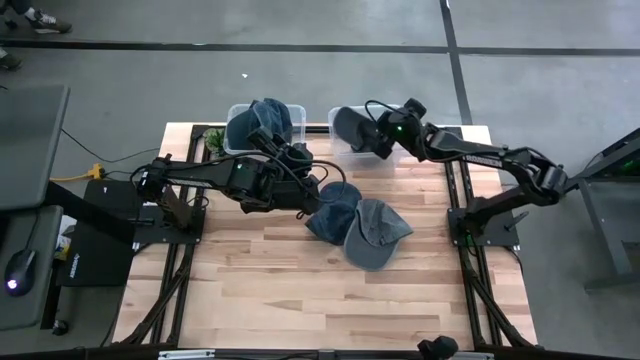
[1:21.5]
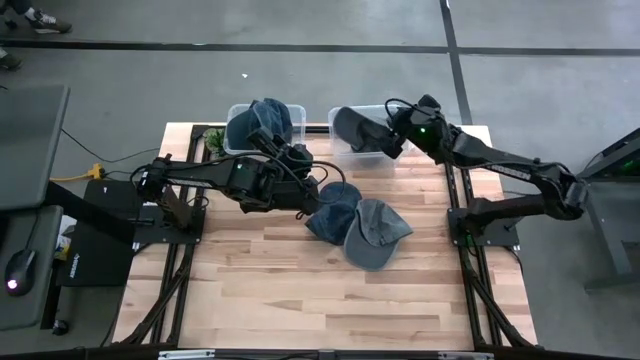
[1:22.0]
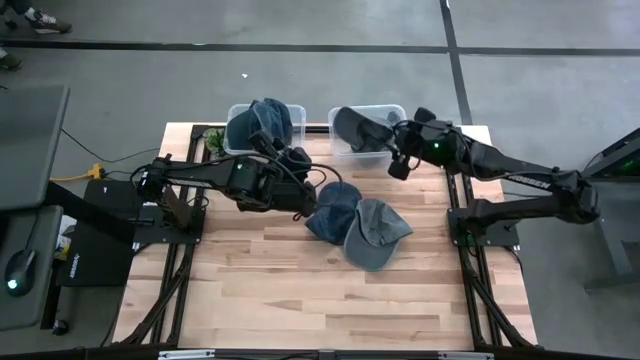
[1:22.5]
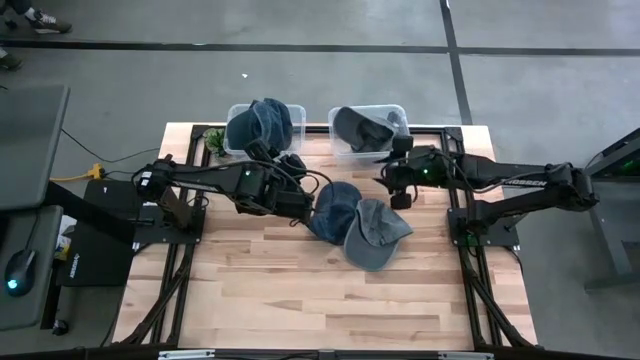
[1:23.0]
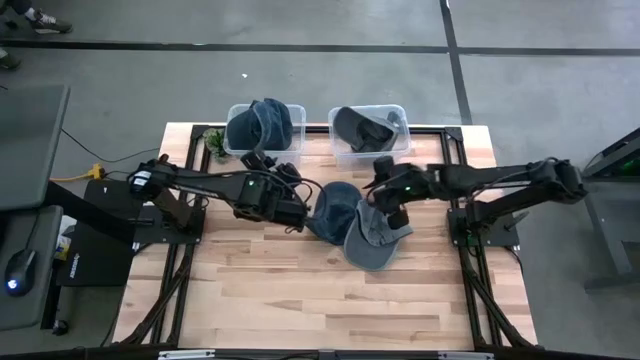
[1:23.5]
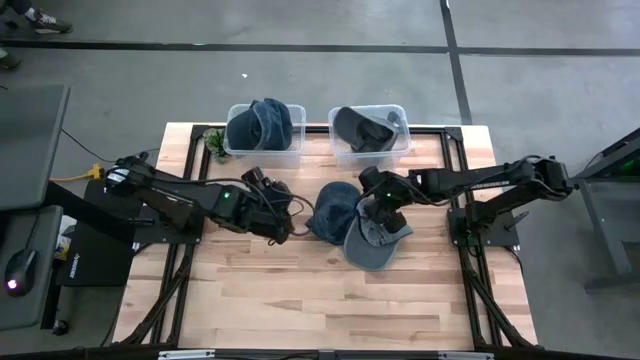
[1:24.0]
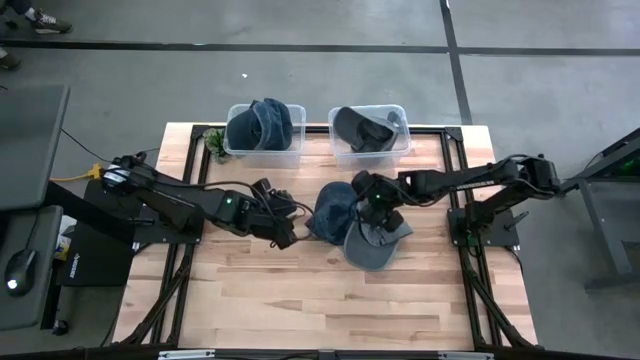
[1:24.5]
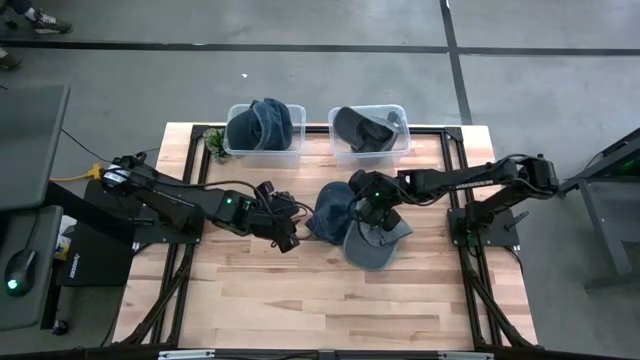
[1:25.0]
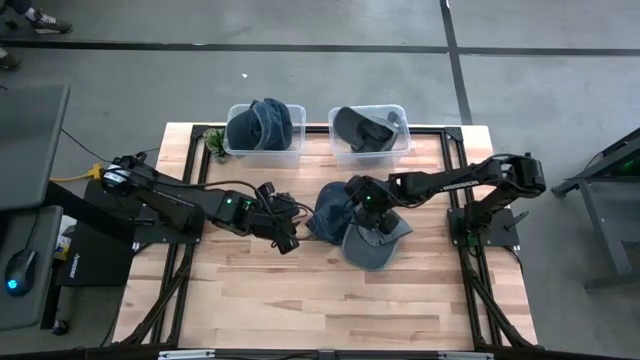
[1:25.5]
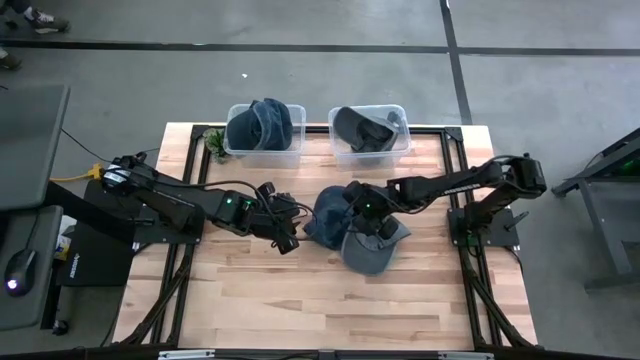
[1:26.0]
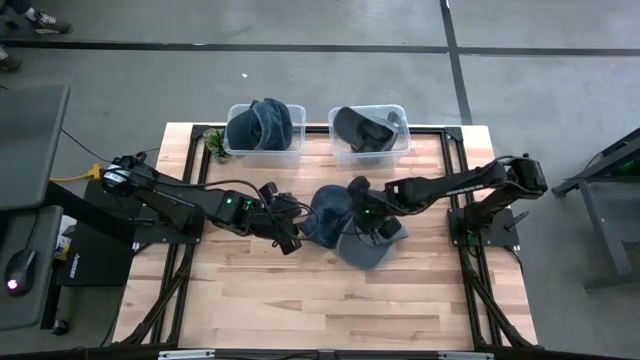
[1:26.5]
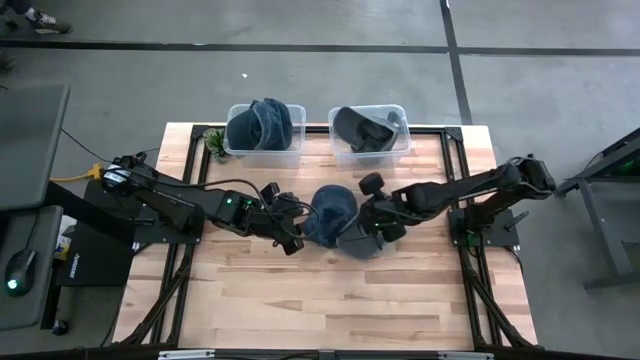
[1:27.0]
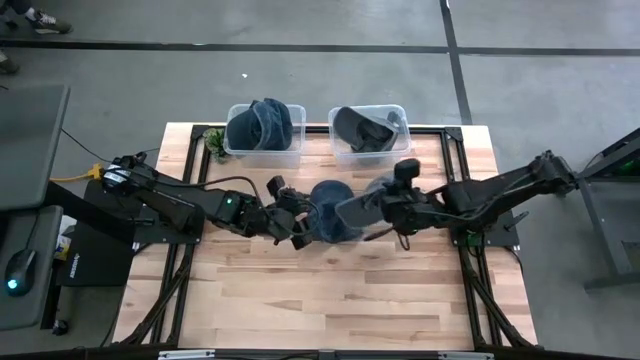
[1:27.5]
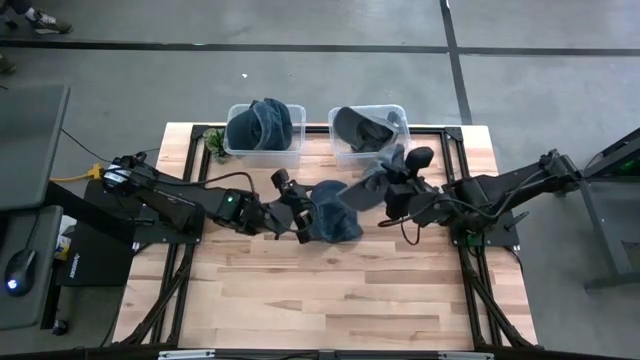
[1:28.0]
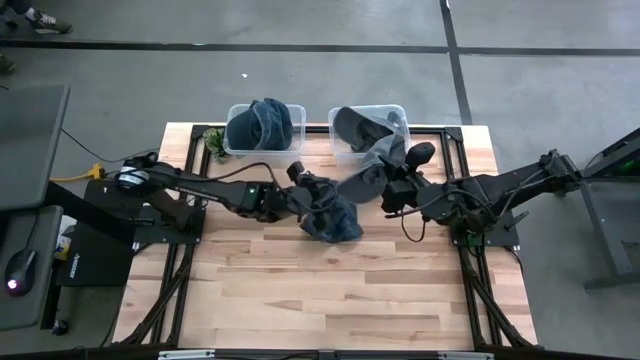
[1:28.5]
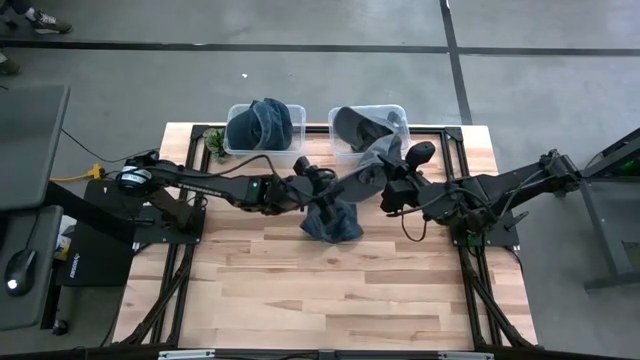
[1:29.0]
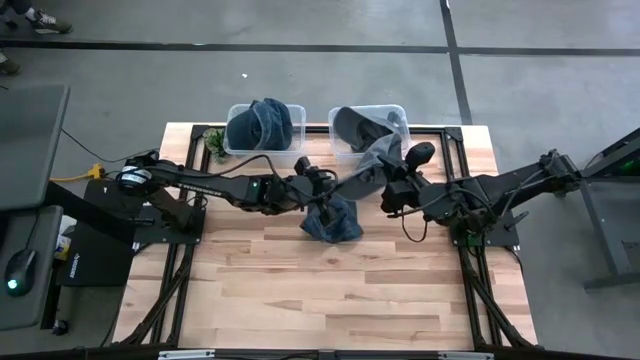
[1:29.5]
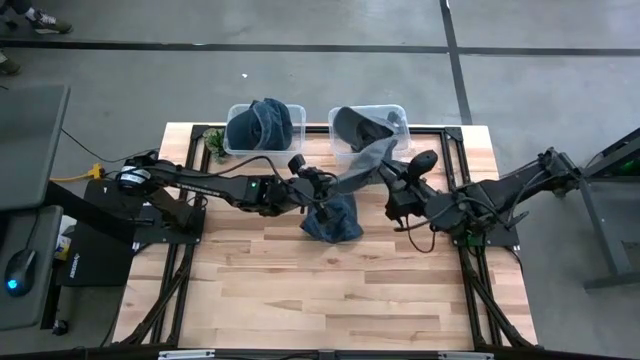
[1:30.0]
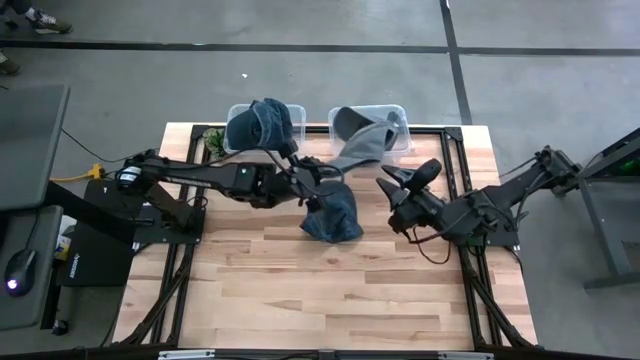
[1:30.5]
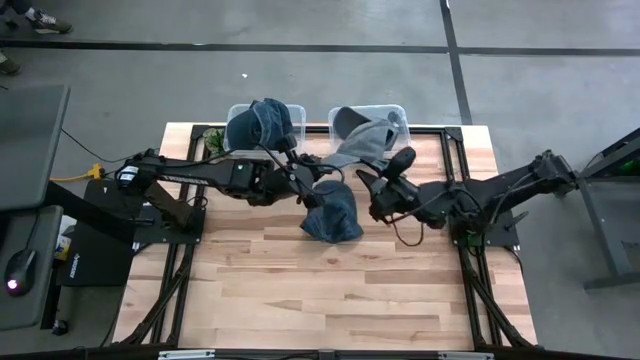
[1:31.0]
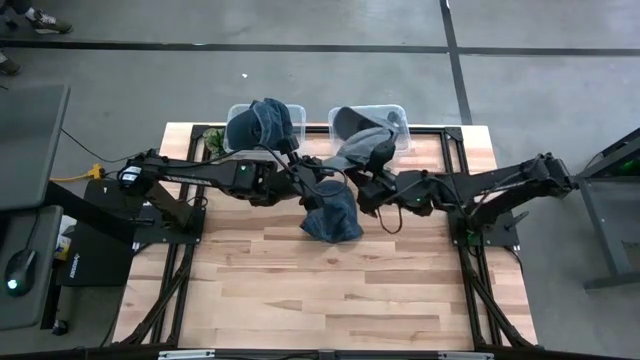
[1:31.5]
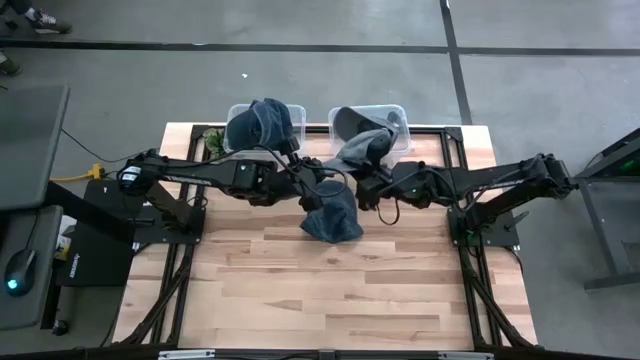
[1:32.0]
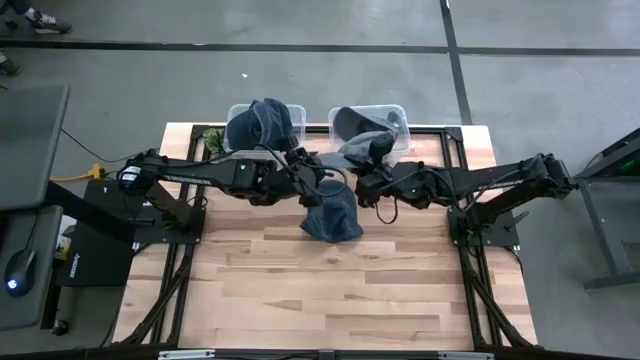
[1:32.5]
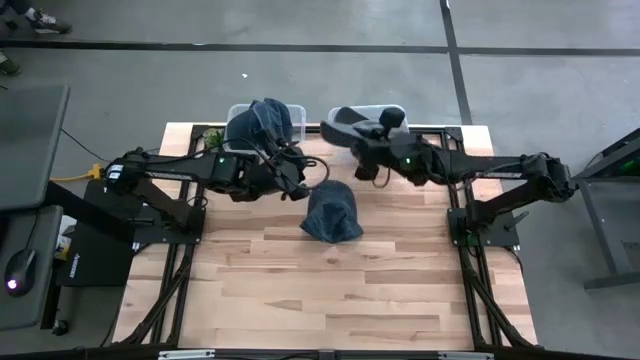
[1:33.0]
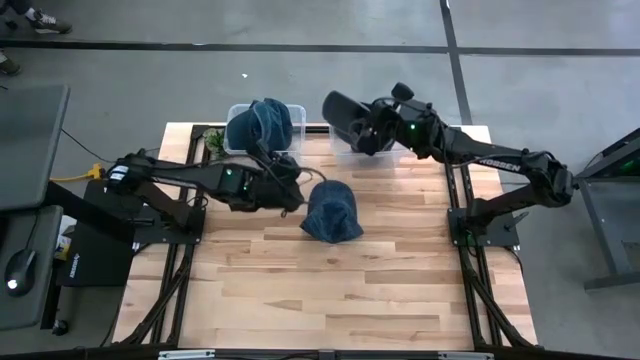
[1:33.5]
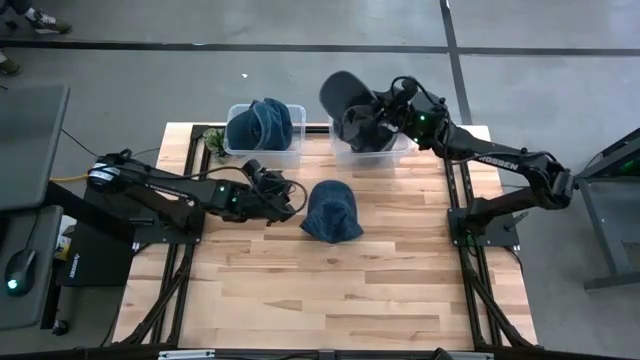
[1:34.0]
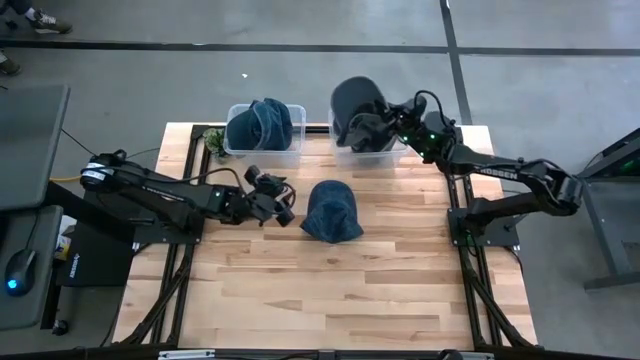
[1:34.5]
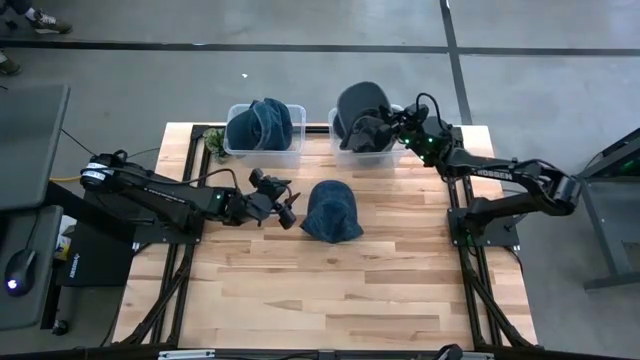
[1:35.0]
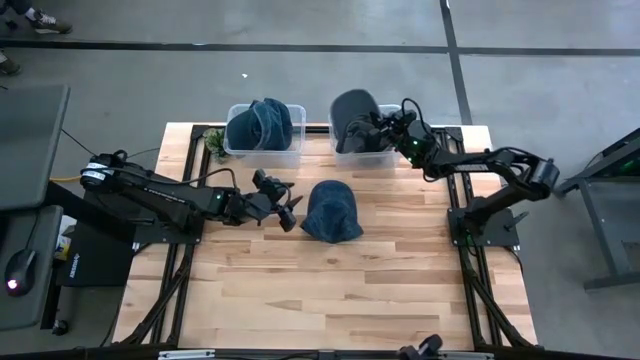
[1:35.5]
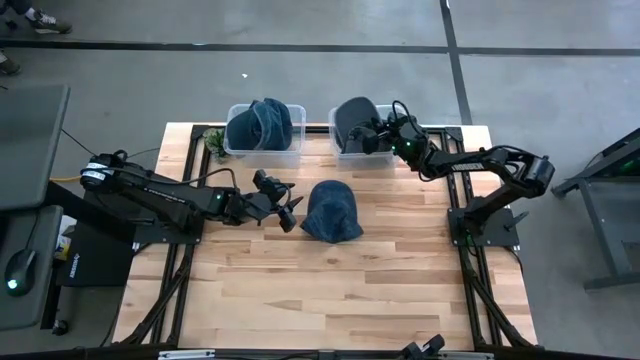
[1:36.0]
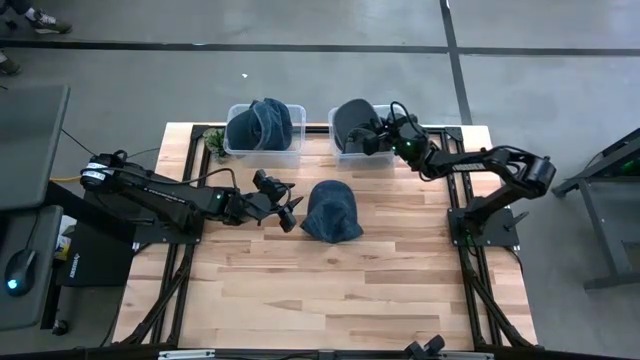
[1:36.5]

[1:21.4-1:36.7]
Task: Pick & Place hat
Put the right gray cap into the right transparent bin

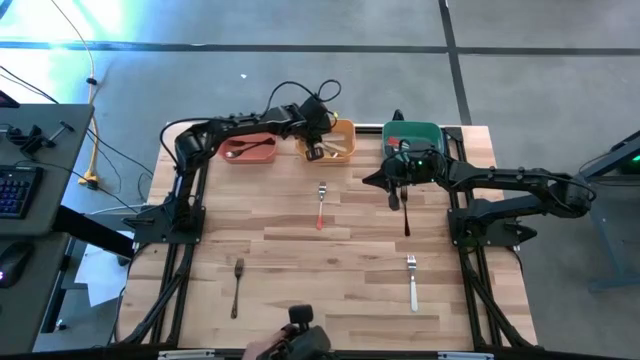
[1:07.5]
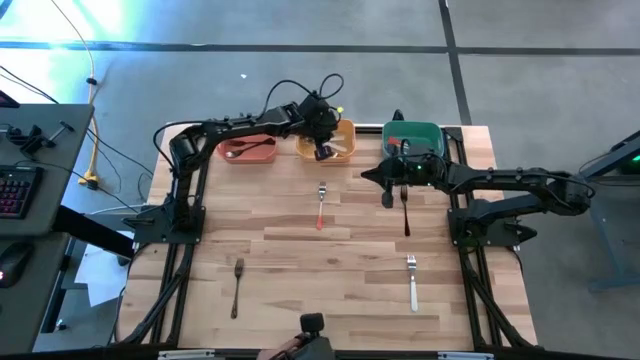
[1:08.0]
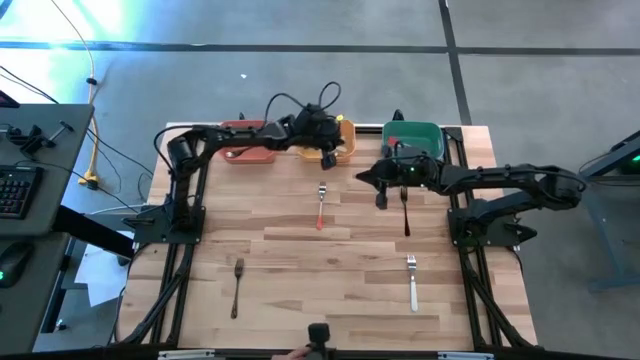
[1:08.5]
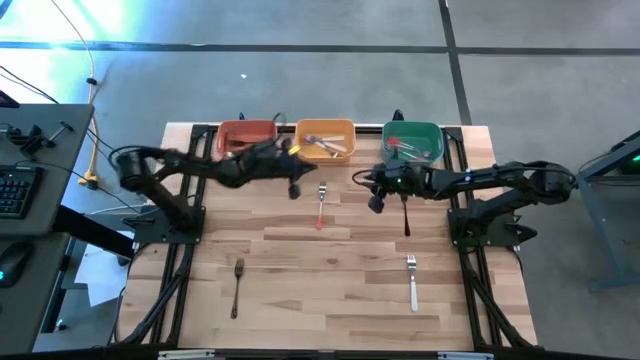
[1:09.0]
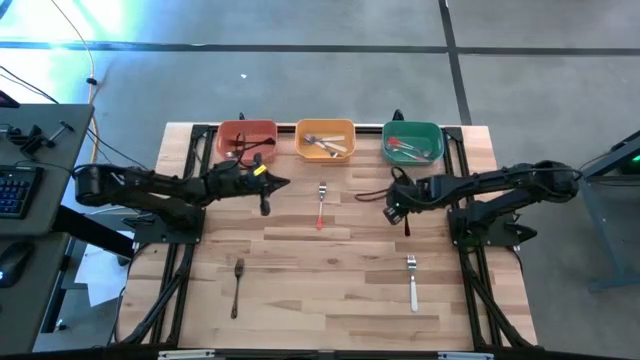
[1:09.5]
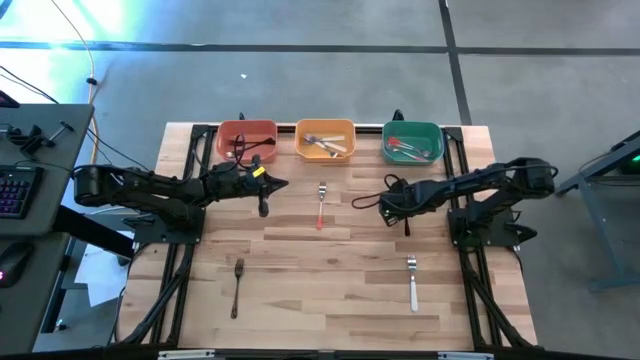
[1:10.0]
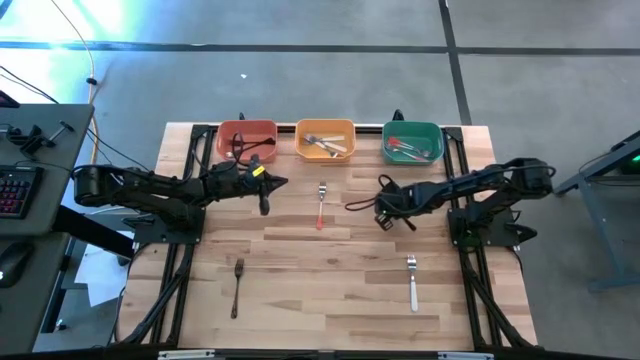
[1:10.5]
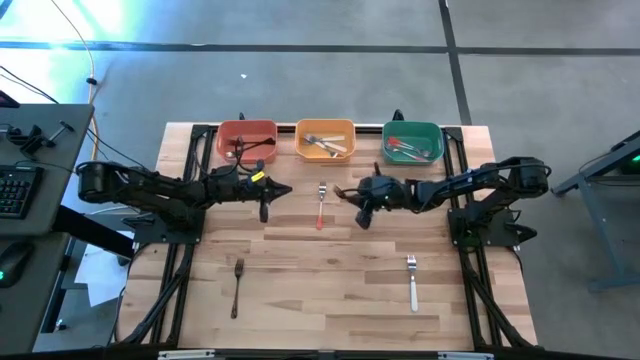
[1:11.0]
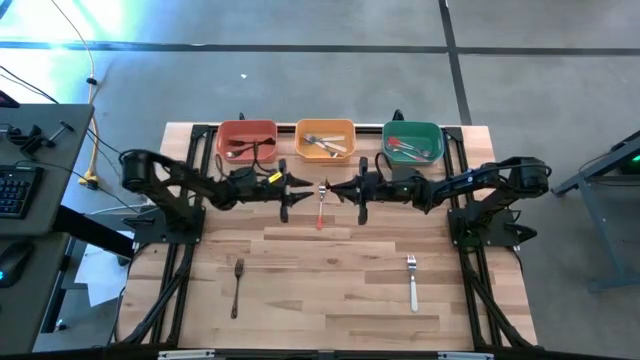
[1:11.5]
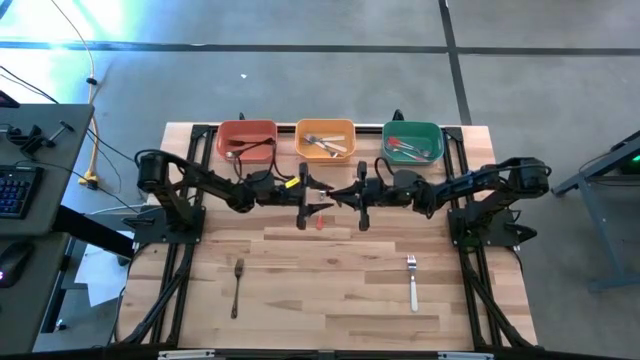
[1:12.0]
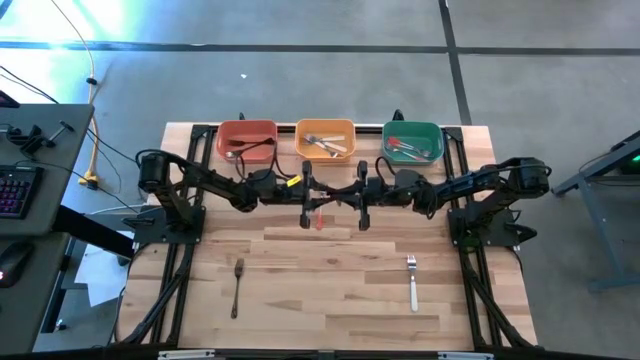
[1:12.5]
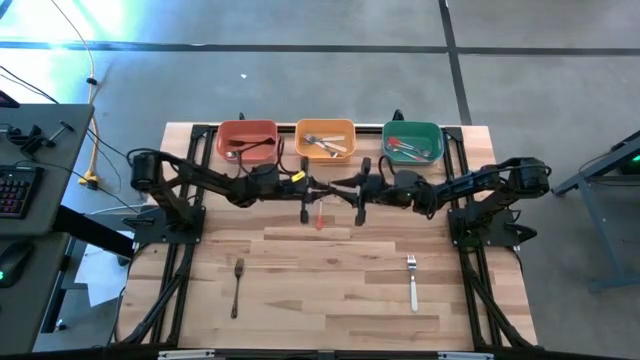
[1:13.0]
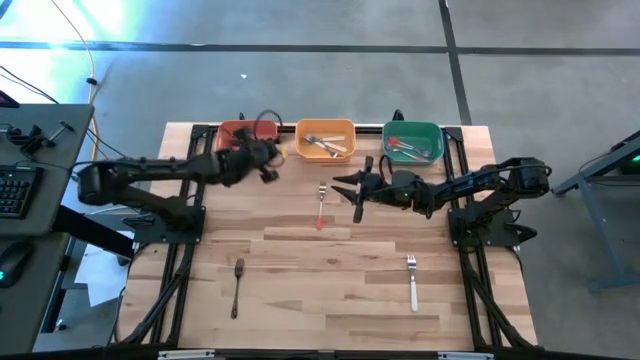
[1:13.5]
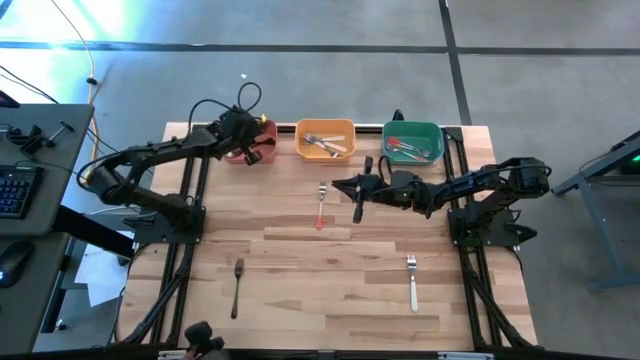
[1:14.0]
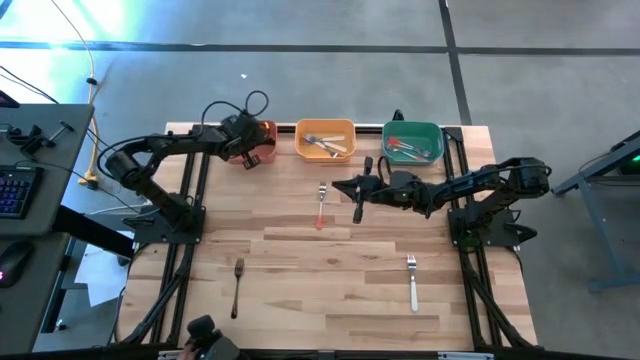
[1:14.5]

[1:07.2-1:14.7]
Task: Sort silverware by color (type)
Put the right black fork into the orange bin
